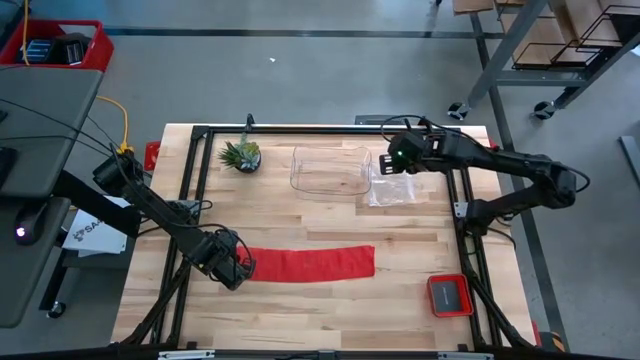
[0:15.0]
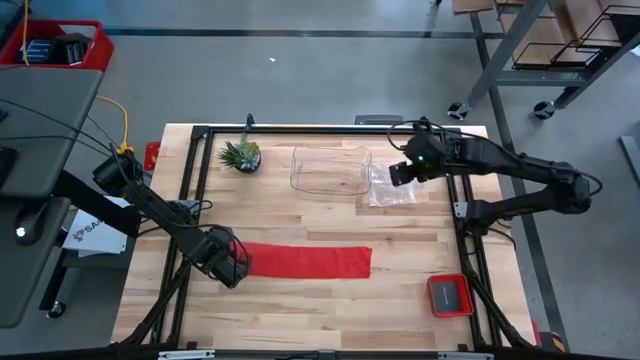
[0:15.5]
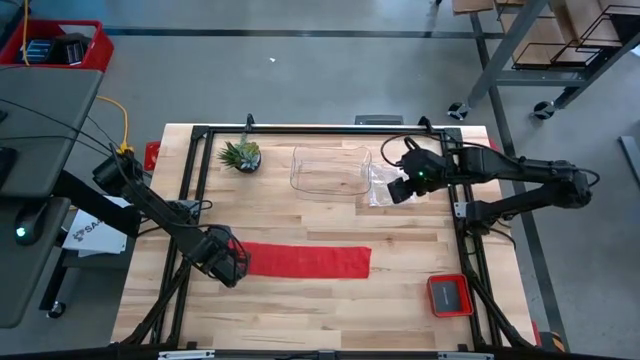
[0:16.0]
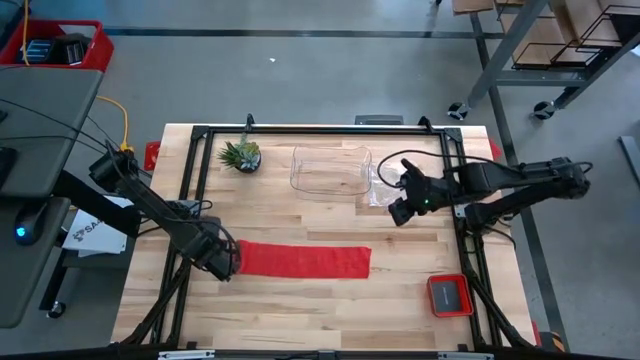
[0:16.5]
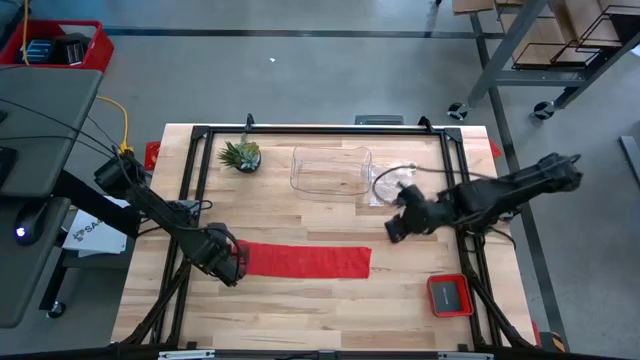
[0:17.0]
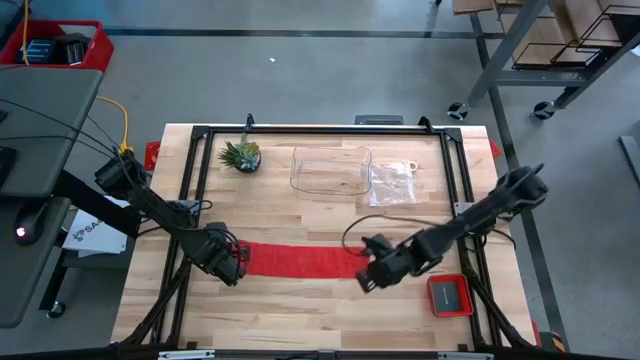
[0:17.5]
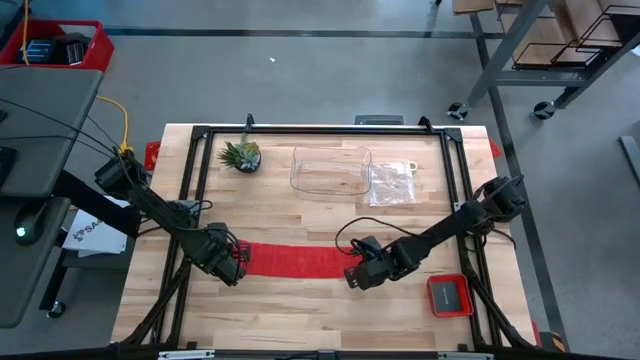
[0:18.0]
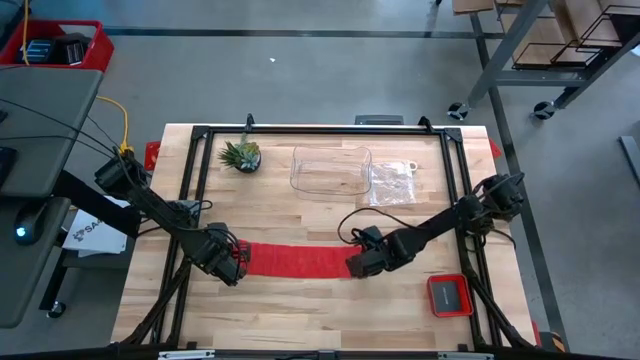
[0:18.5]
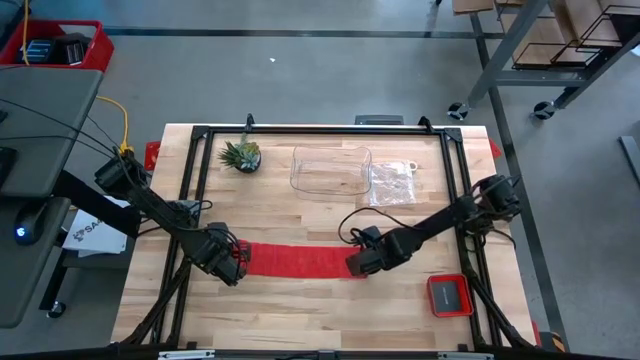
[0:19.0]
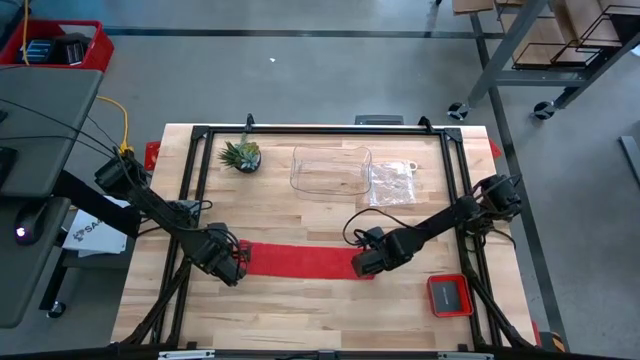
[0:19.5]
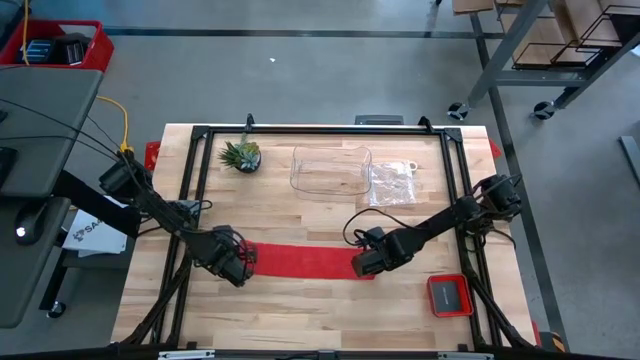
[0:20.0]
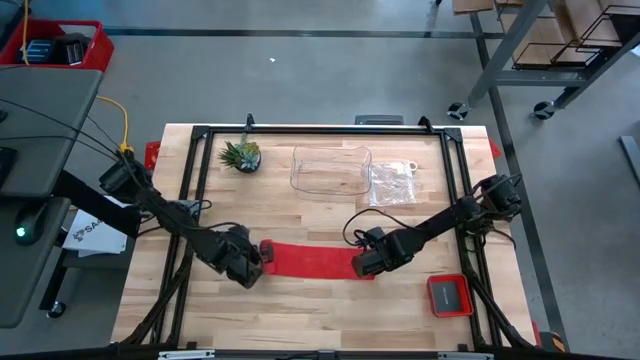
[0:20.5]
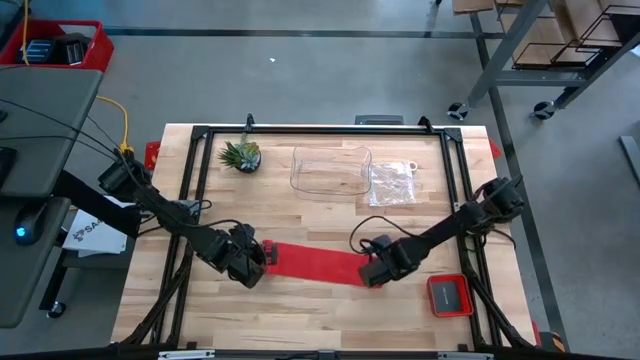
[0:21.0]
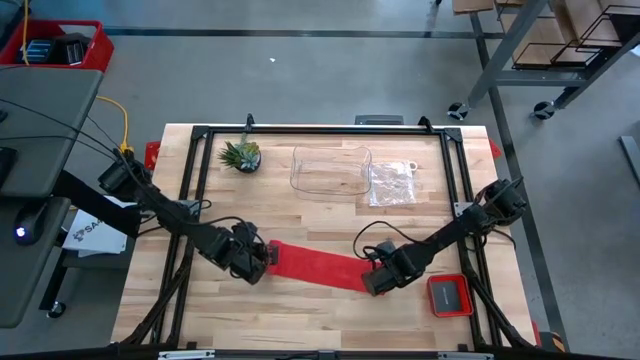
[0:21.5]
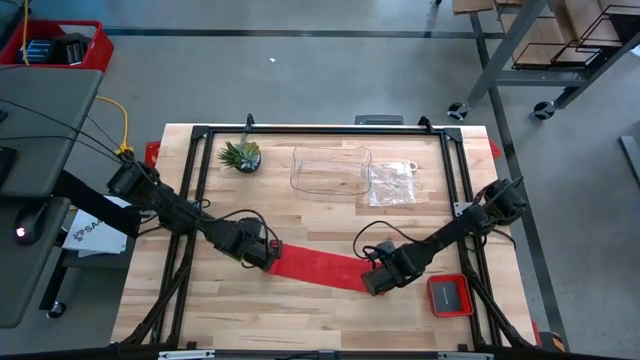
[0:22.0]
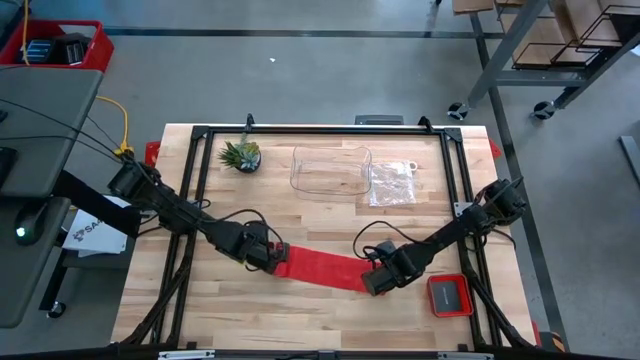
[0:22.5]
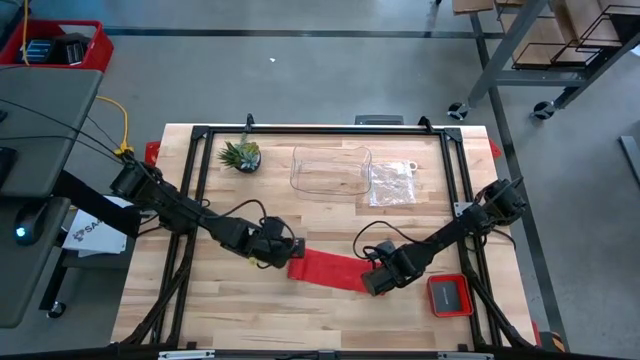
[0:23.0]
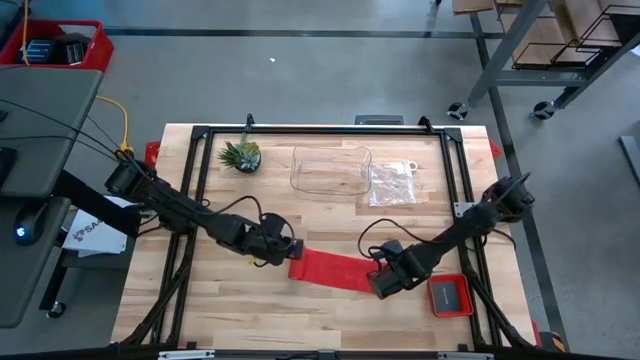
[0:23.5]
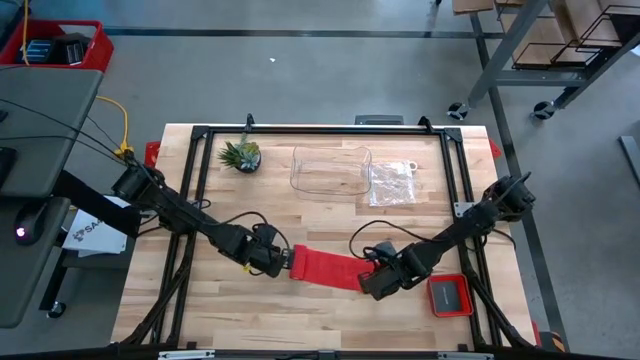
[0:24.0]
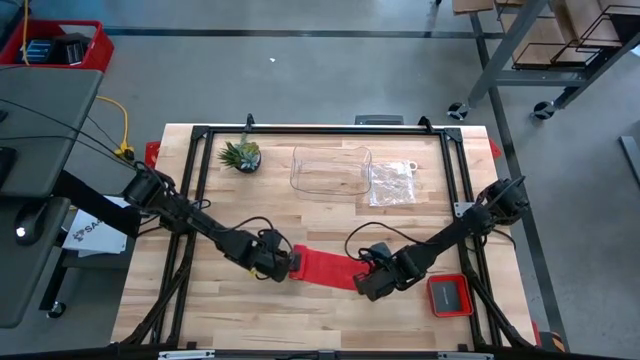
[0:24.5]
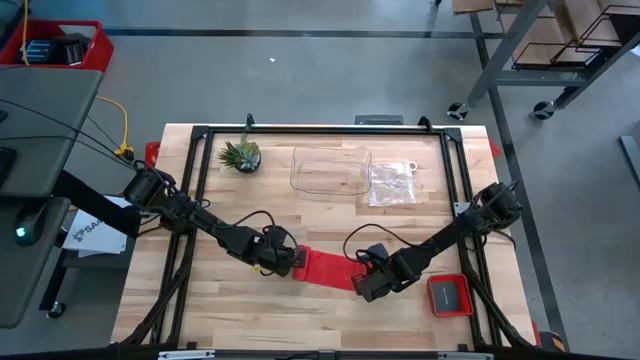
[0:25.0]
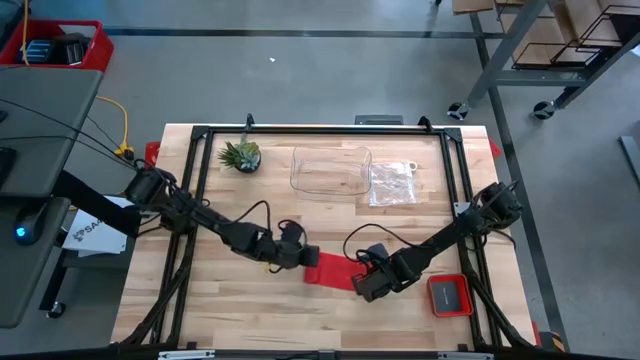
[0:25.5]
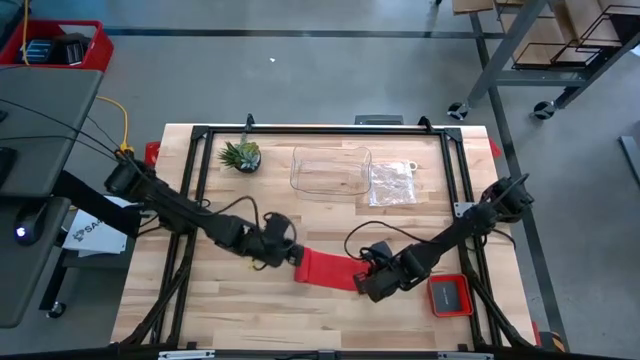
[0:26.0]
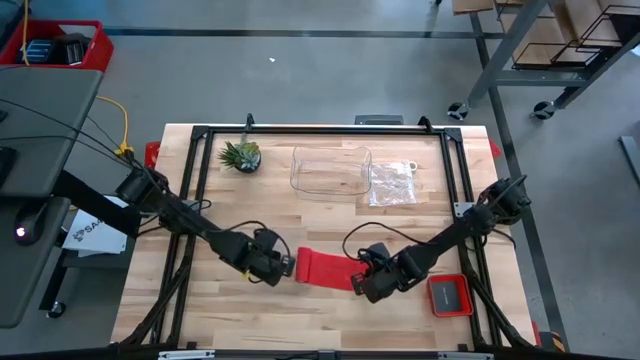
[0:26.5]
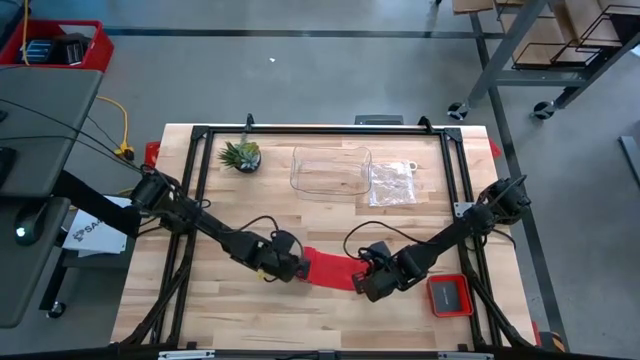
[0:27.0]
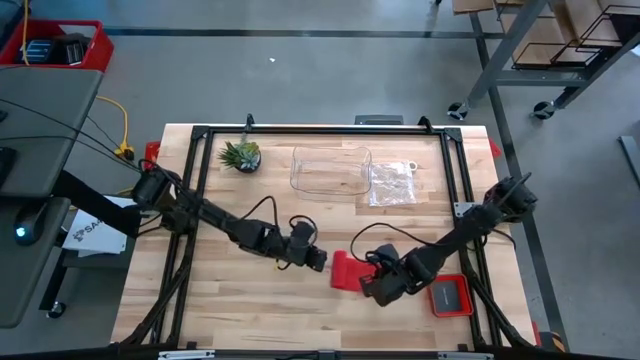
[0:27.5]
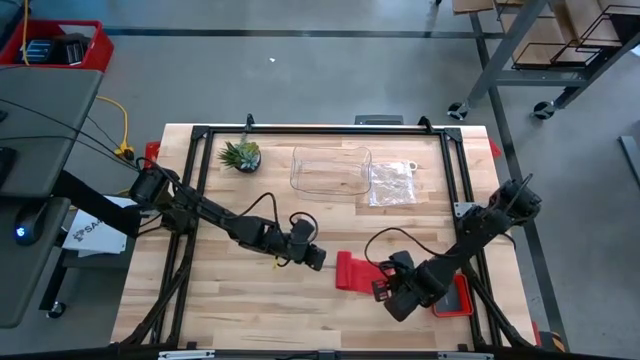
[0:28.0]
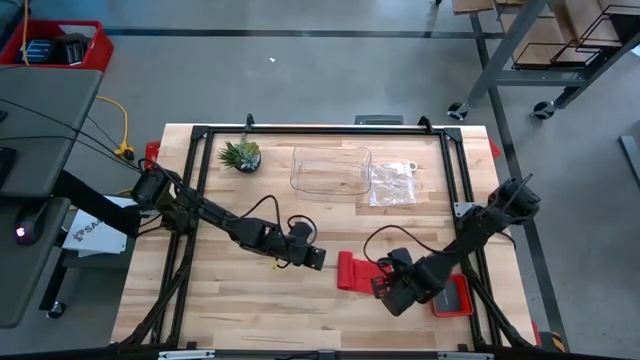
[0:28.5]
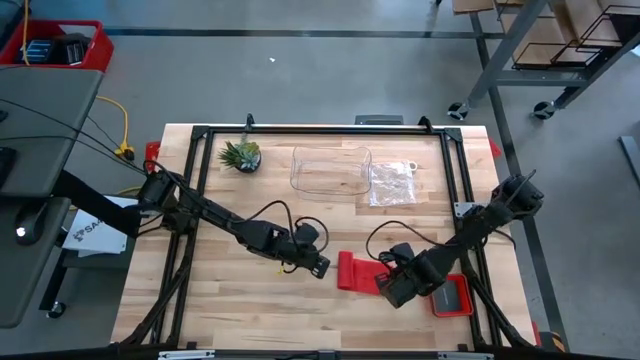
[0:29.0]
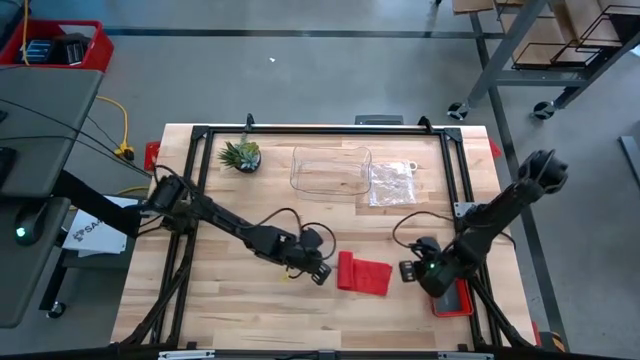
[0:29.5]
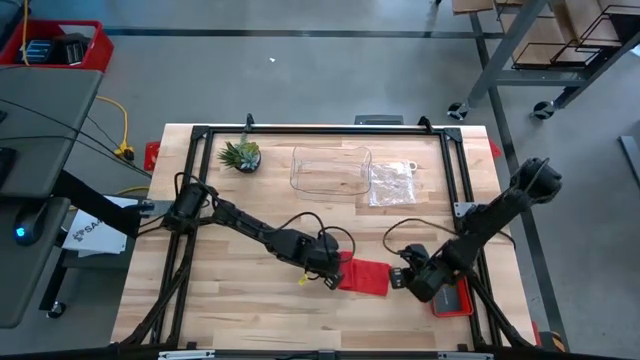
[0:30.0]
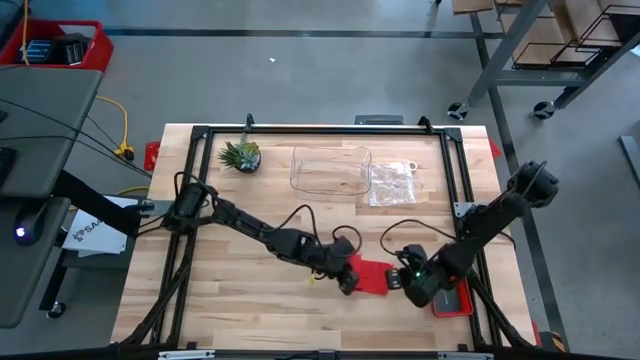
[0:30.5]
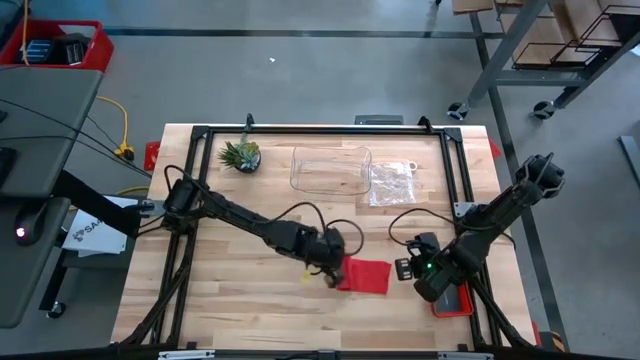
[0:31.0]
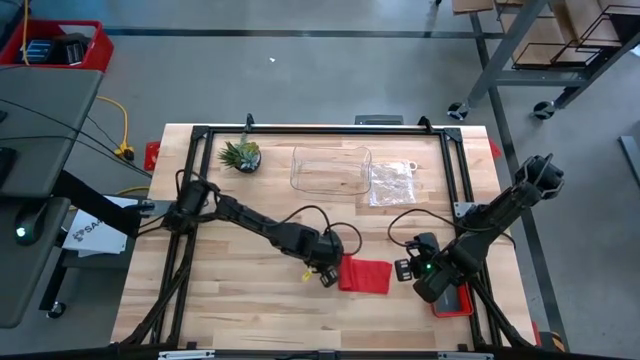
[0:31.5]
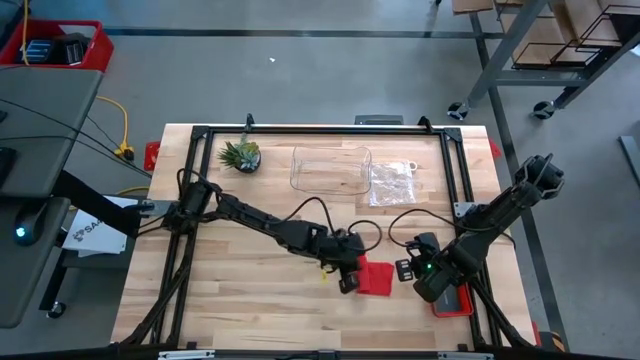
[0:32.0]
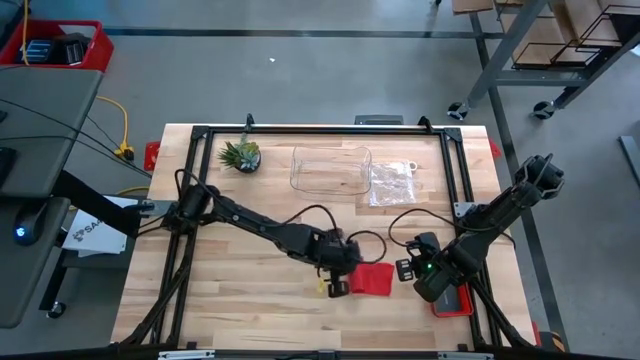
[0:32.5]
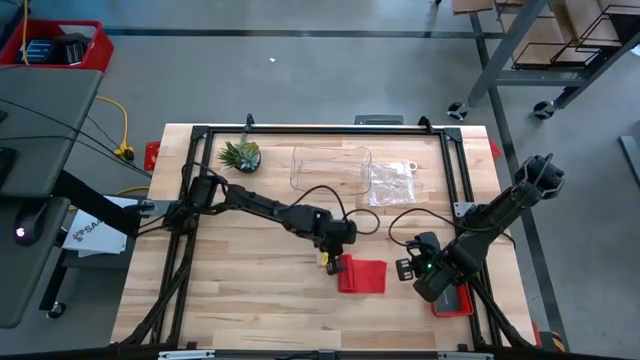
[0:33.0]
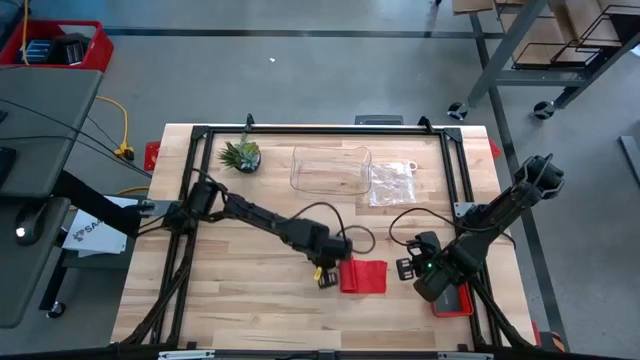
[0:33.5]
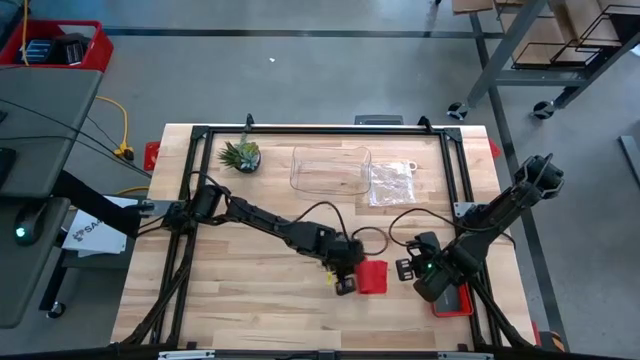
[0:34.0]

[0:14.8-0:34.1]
Task: Roll bandage
Roll the red bandage
